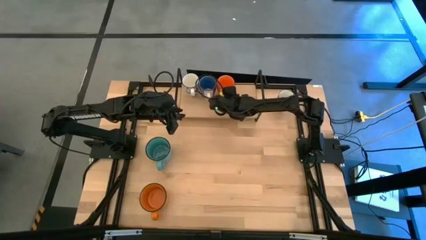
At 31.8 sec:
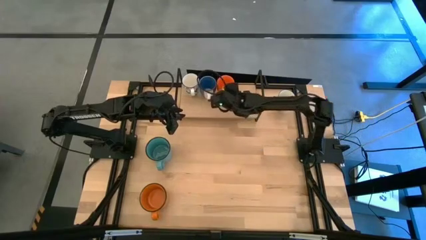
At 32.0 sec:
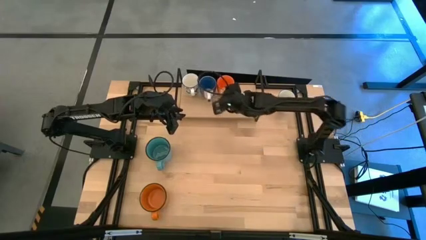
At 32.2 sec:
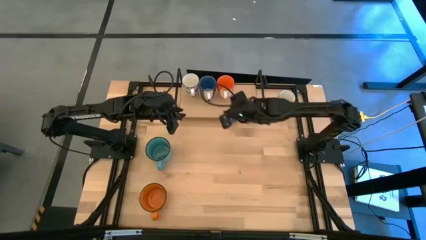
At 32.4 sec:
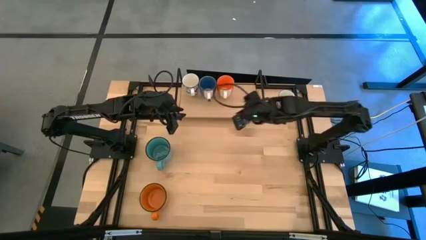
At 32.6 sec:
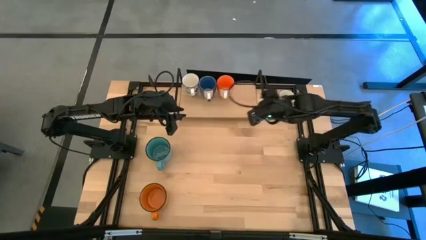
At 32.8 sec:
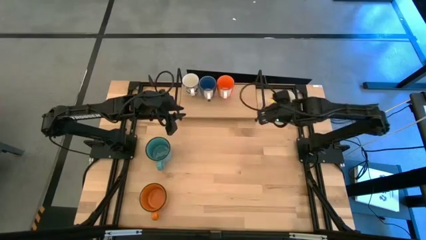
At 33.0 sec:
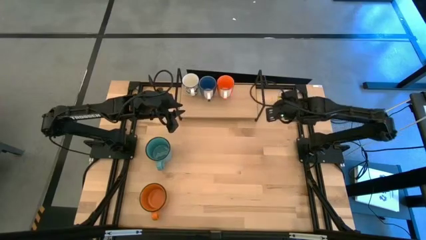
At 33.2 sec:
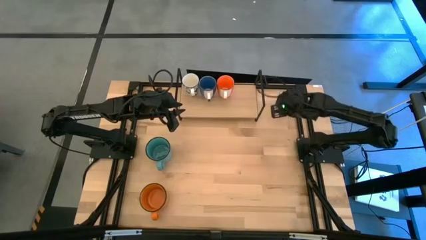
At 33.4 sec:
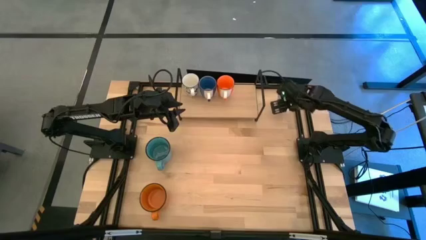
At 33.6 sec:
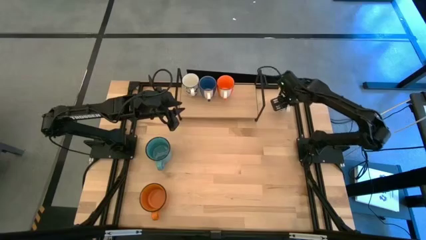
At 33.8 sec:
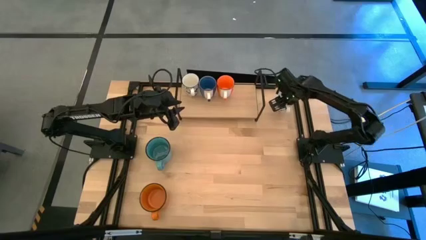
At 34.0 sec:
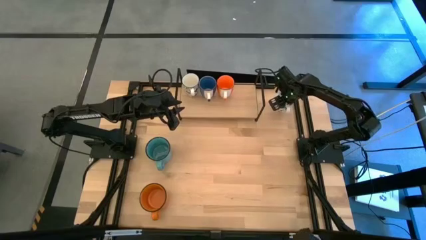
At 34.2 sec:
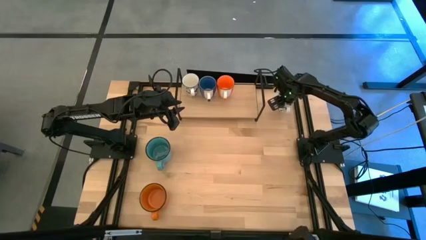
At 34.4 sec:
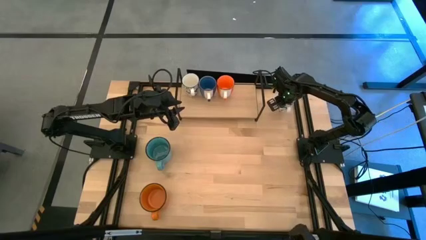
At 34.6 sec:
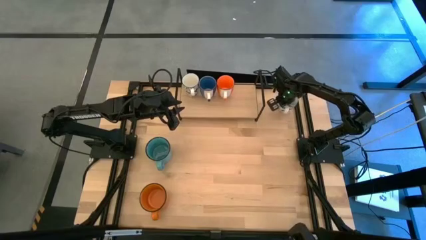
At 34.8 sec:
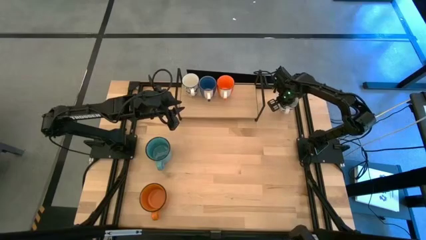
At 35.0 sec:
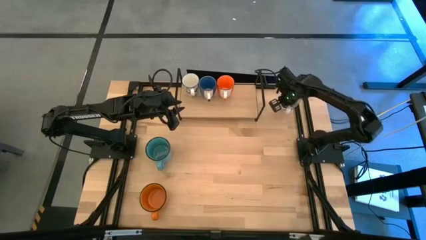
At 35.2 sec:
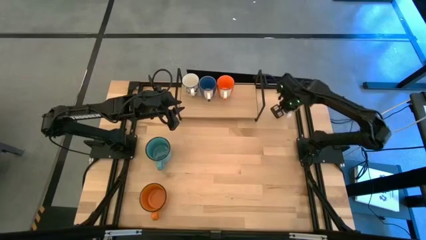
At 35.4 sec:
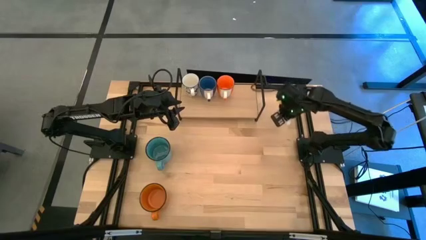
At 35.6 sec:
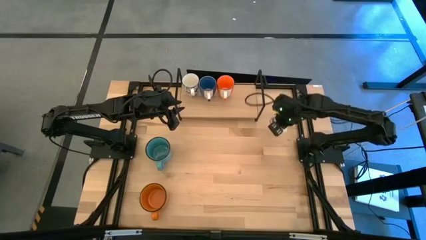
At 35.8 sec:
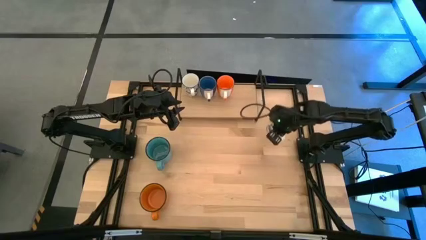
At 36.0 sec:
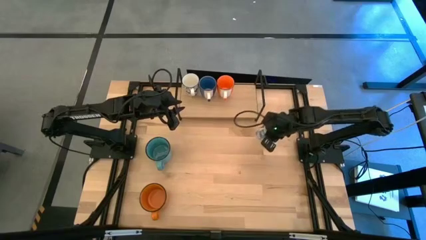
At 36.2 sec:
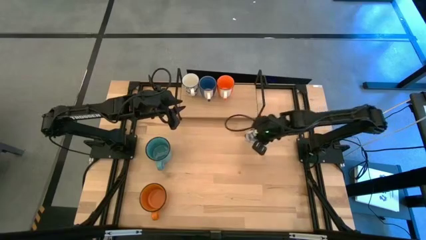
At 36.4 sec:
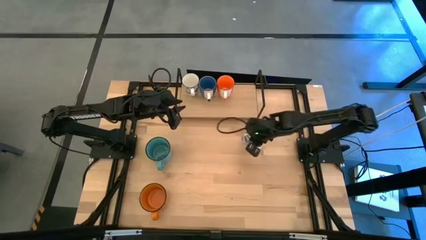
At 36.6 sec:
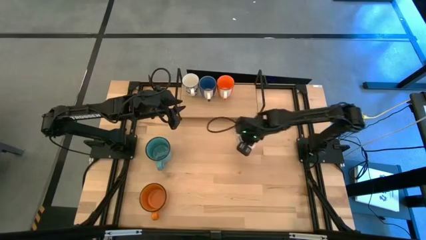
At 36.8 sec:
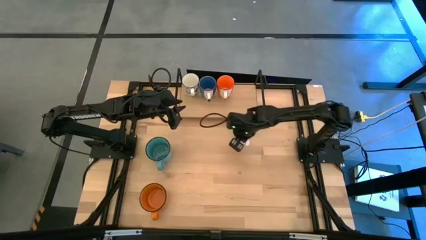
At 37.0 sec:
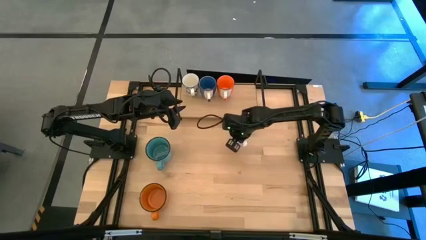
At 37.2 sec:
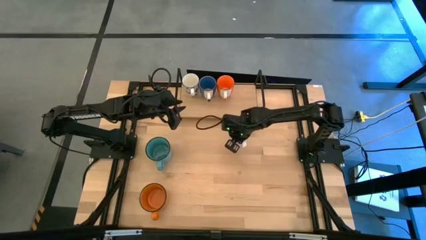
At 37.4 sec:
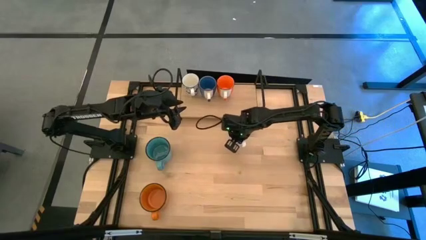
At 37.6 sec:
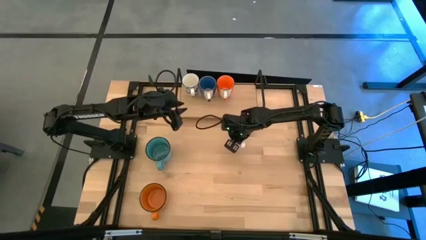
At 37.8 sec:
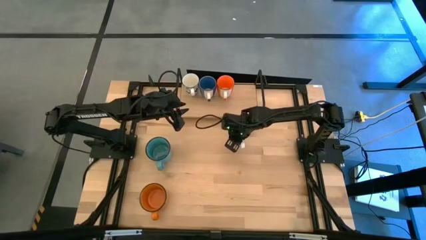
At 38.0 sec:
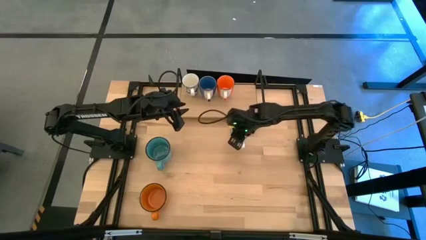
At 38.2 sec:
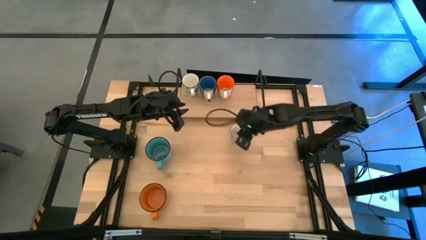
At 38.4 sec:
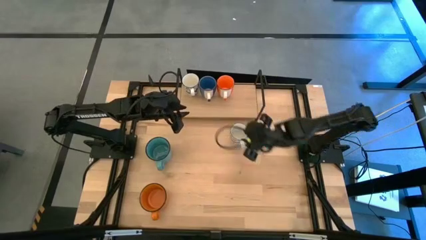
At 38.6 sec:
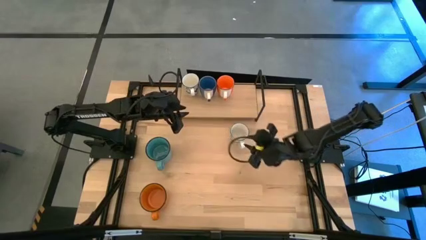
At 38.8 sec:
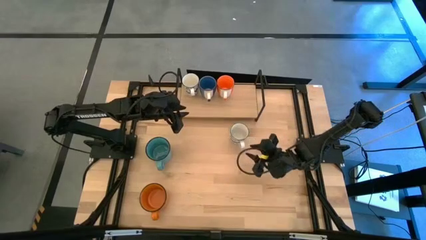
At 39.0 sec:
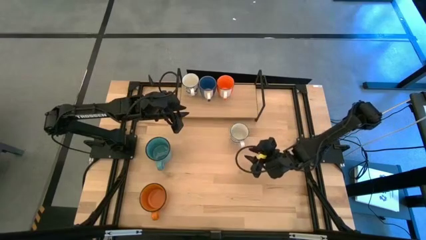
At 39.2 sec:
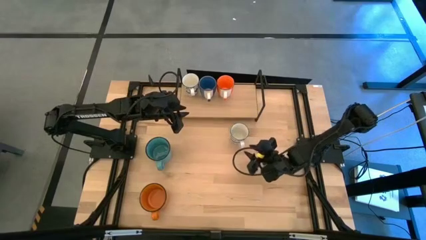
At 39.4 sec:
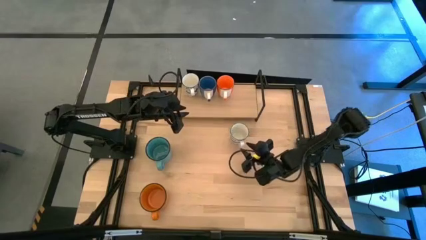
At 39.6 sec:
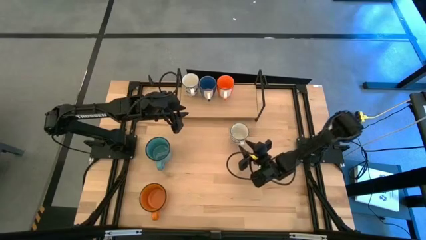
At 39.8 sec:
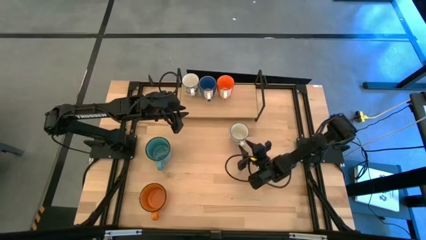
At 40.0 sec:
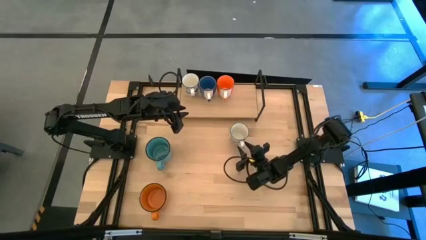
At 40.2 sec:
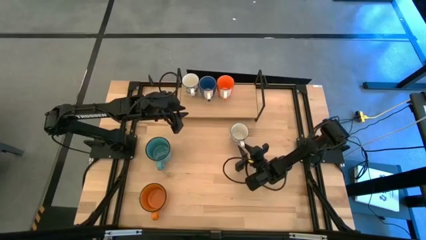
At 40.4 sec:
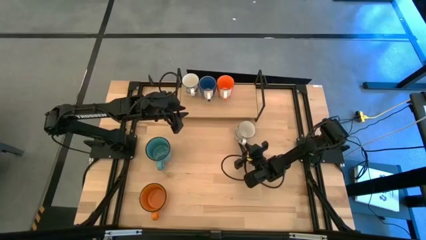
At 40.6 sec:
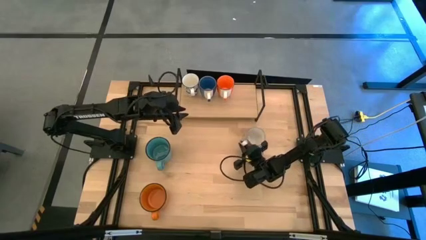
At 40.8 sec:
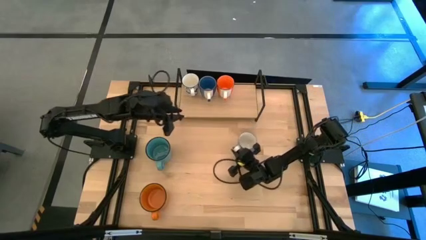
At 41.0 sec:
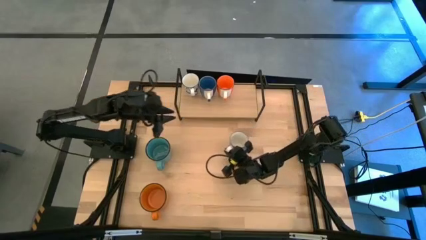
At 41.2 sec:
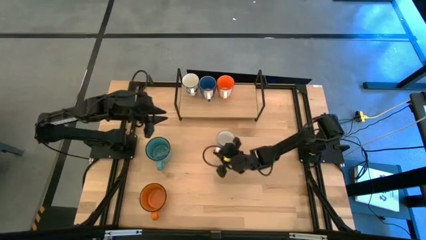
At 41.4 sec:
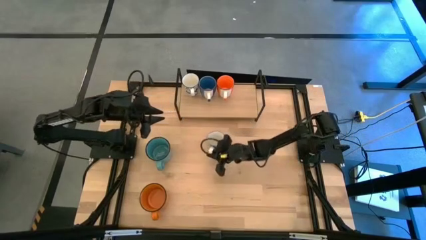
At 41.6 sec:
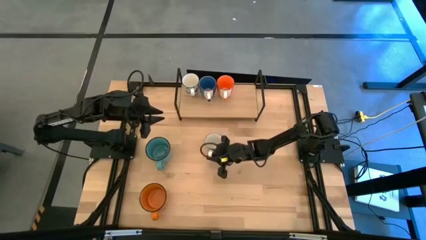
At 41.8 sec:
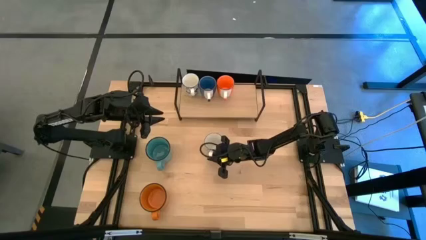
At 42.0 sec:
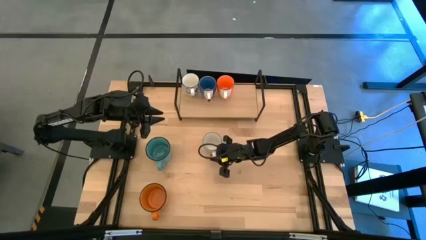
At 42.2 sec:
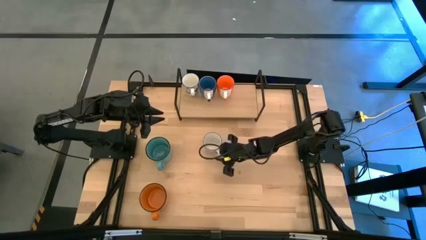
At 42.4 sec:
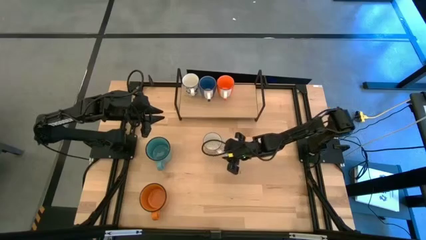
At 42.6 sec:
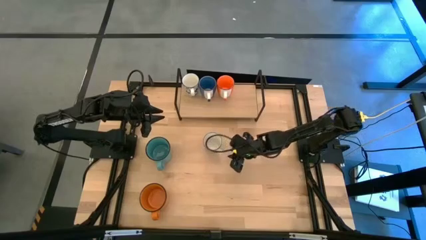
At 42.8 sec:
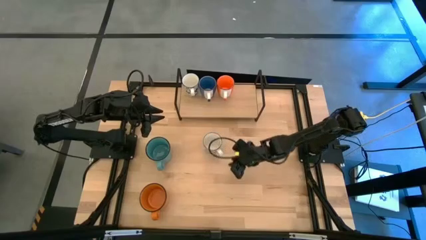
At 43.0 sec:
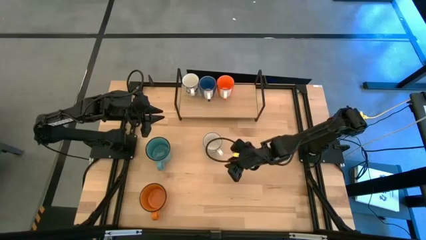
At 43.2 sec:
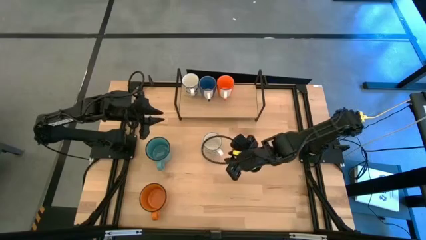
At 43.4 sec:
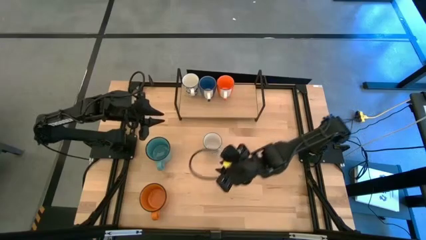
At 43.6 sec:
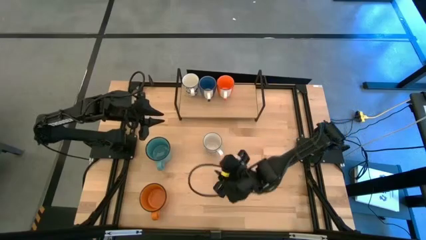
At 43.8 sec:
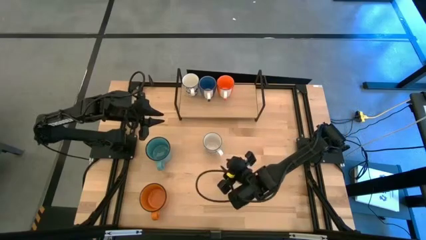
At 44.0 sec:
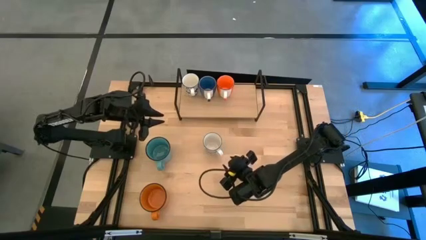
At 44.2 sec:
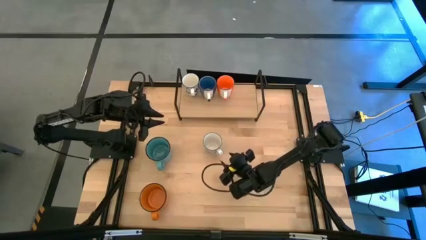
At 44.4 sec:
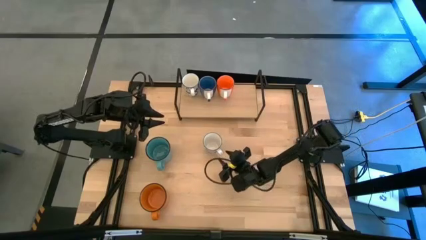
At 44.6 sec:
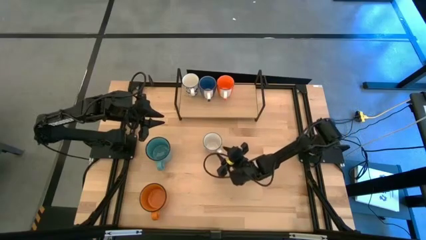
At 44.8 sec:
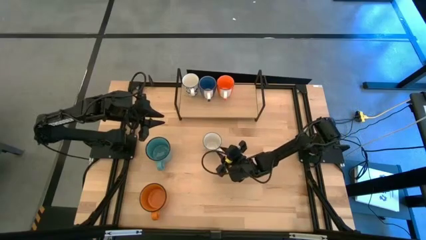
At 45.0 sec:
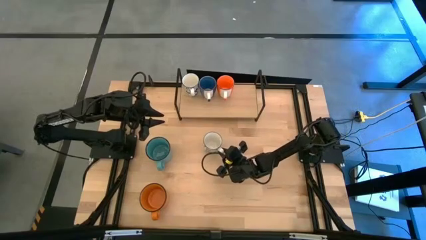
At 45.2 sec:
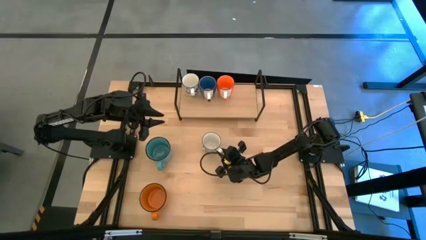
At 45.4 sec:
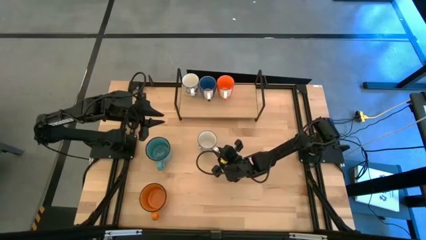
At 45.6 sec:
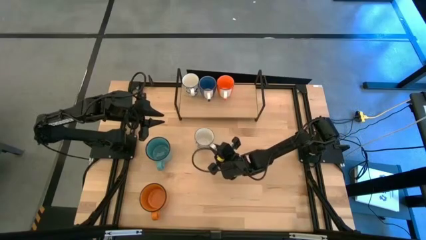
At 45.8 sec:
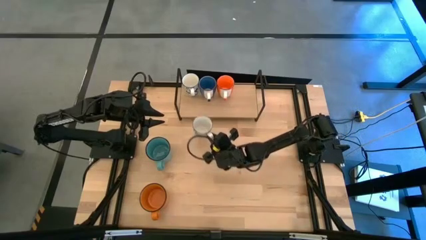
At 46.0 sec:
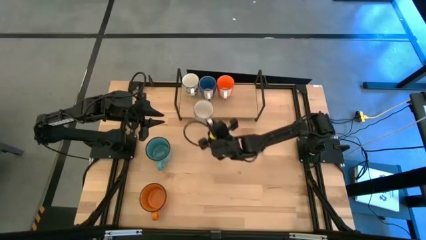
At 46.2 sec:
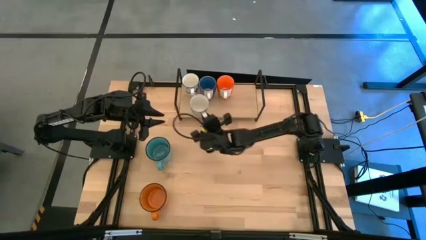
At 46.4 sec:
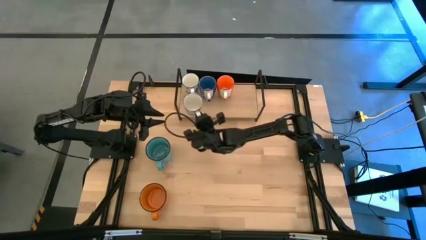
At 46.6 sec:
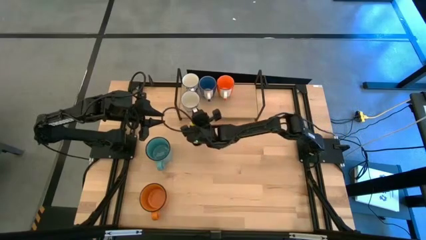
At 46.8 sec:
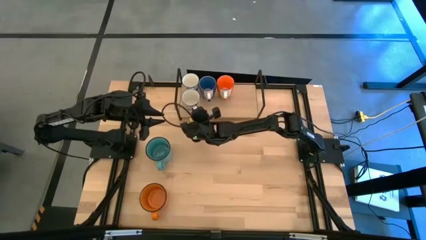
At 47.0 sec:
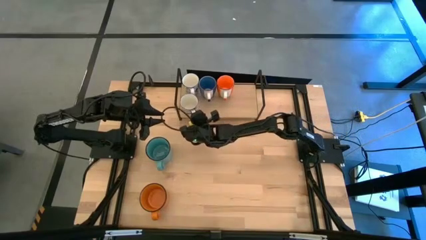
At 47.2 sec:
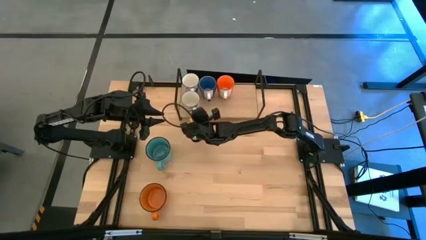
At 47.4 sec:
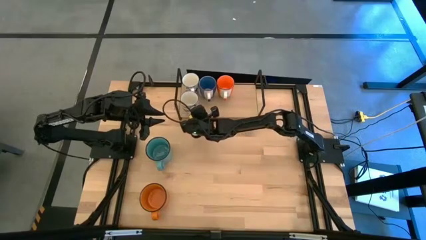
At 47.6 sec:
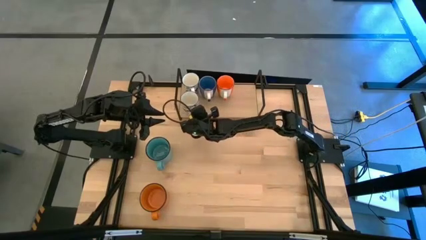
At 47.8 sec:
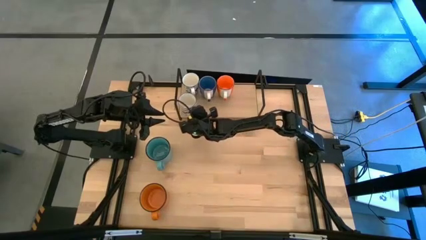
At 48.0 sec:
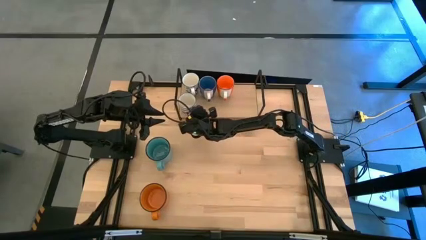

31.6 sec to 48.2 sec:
Task: Place coffee mugs
Put the white blue patterned mug on the shelf
